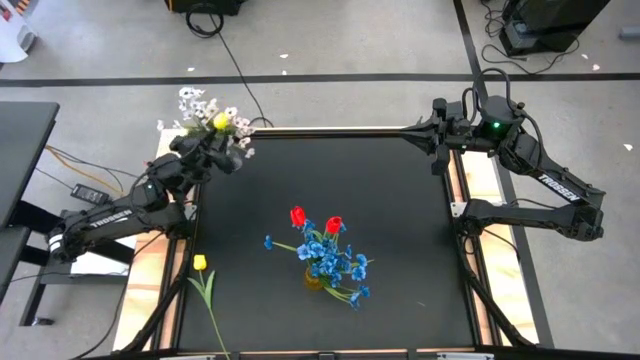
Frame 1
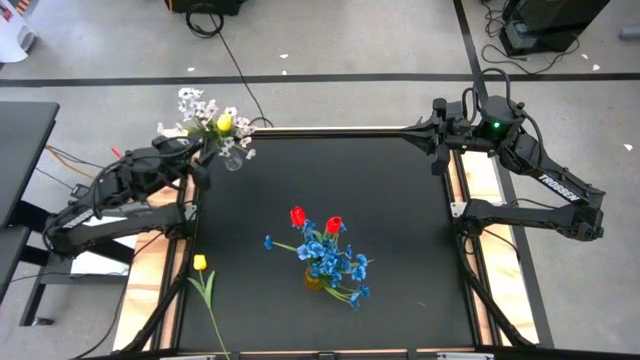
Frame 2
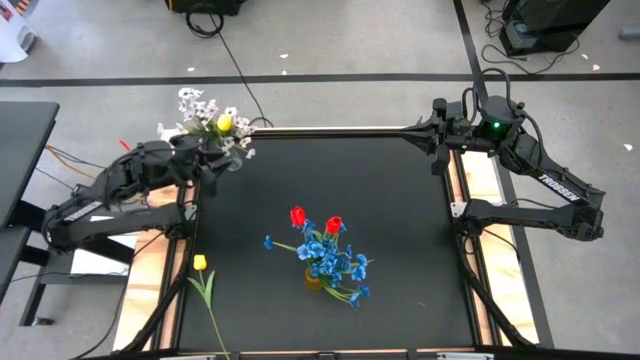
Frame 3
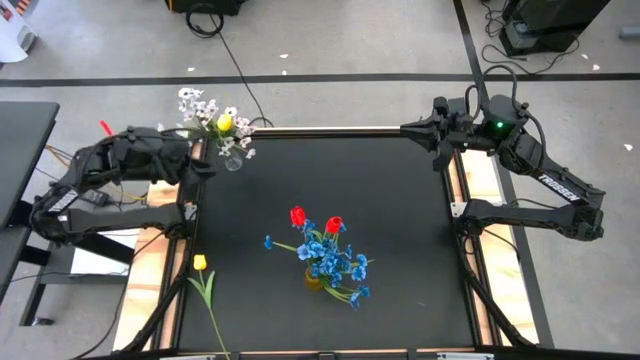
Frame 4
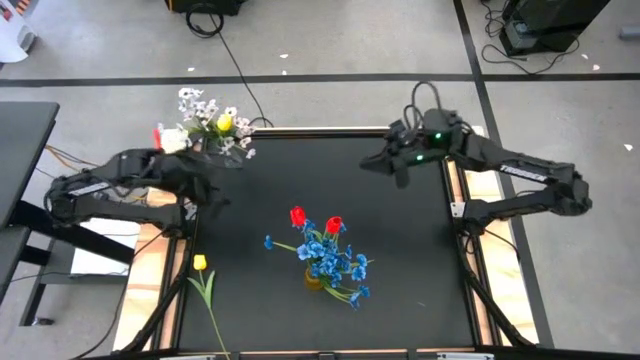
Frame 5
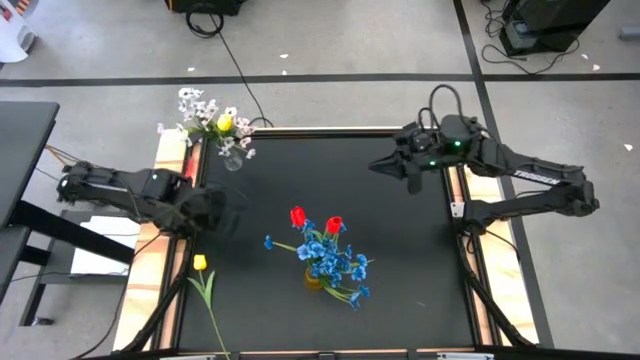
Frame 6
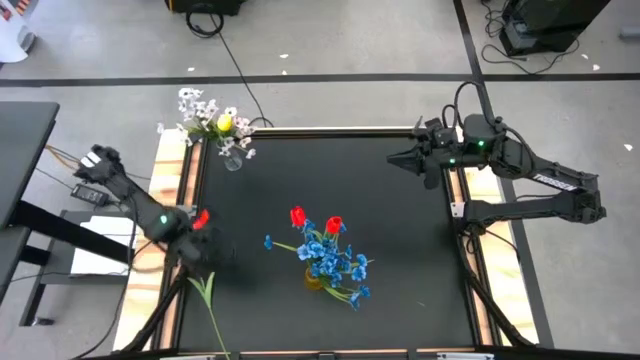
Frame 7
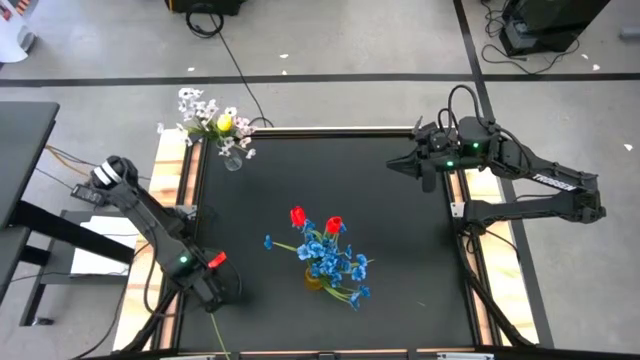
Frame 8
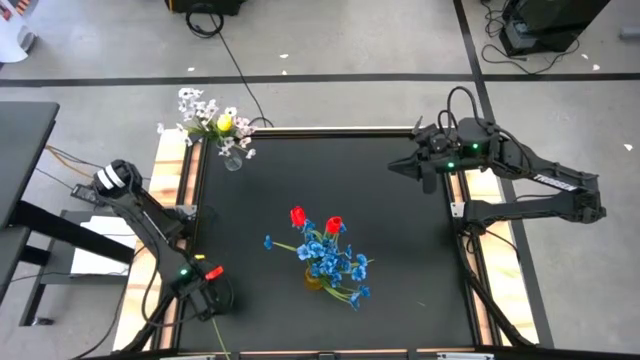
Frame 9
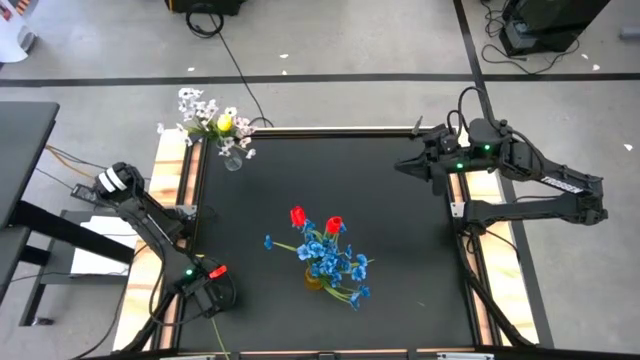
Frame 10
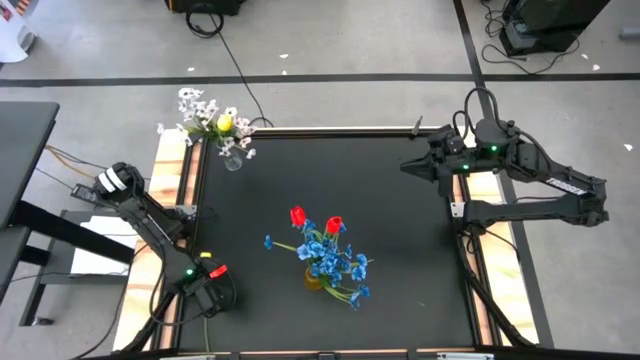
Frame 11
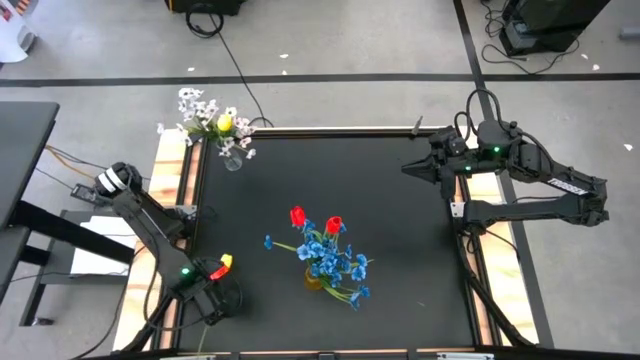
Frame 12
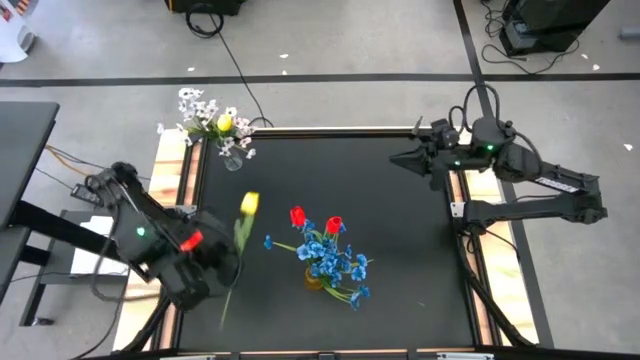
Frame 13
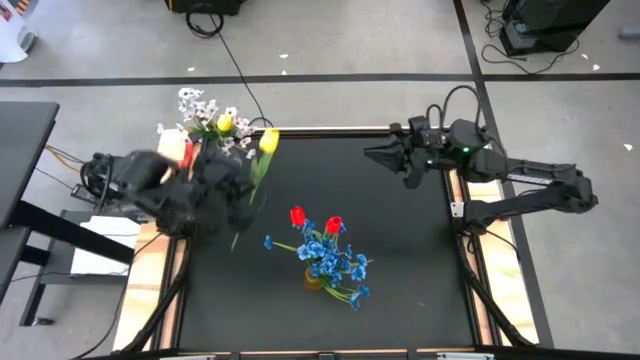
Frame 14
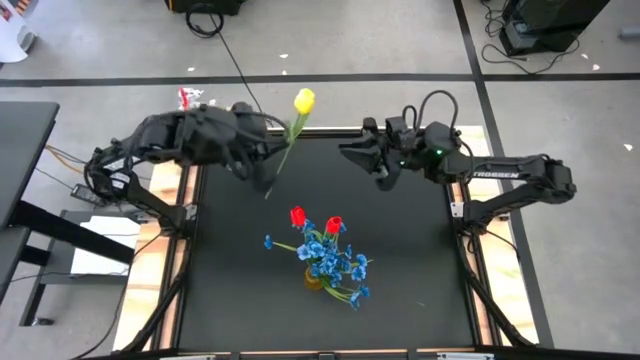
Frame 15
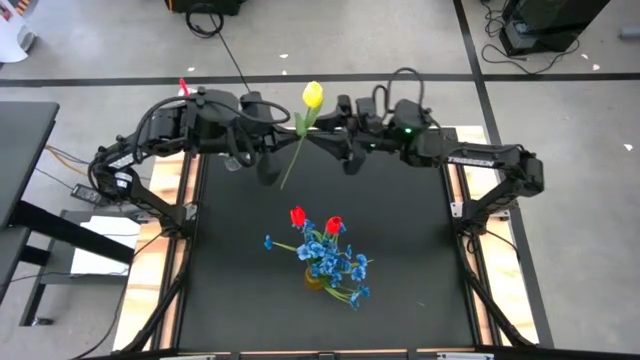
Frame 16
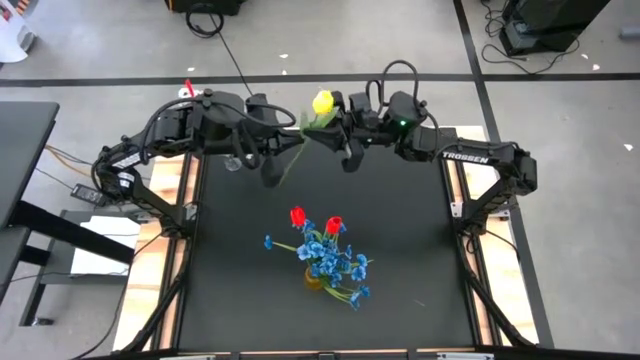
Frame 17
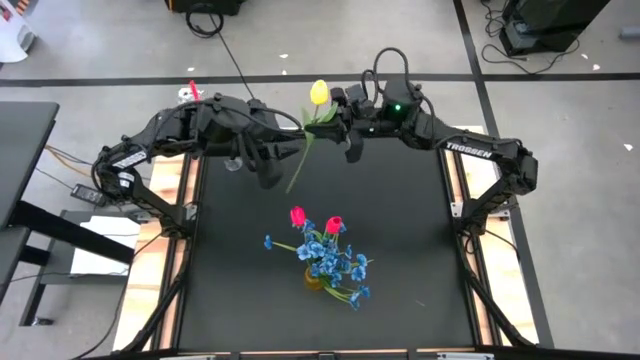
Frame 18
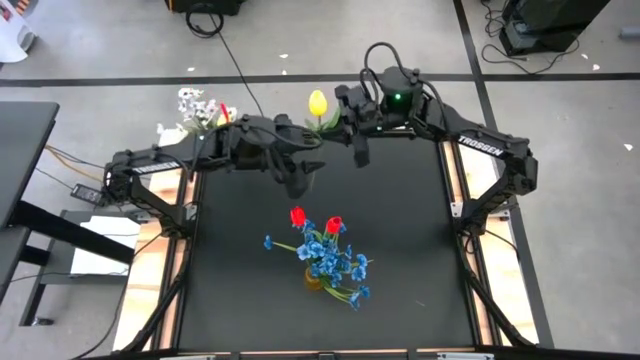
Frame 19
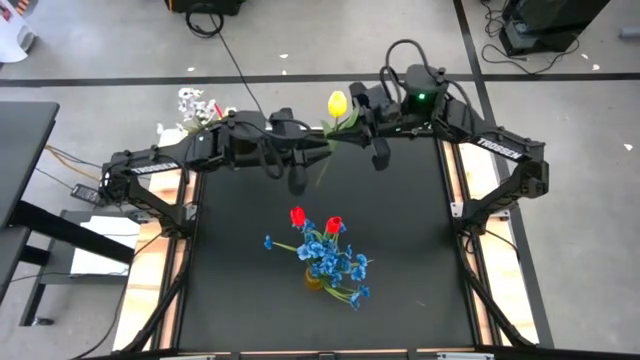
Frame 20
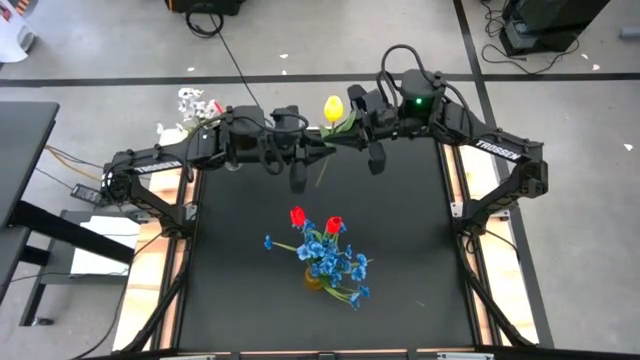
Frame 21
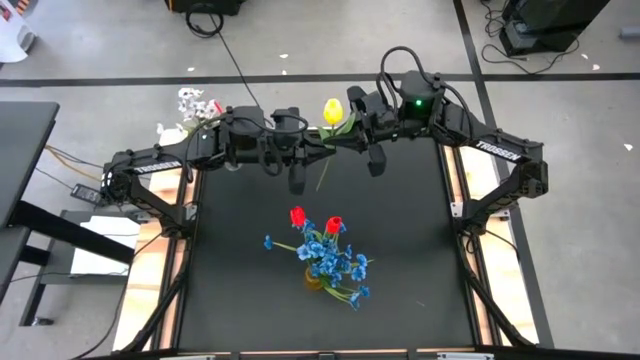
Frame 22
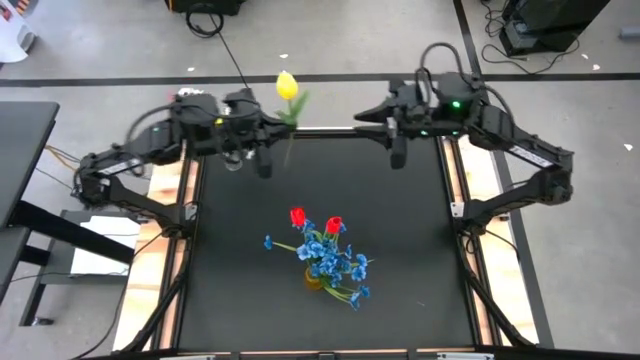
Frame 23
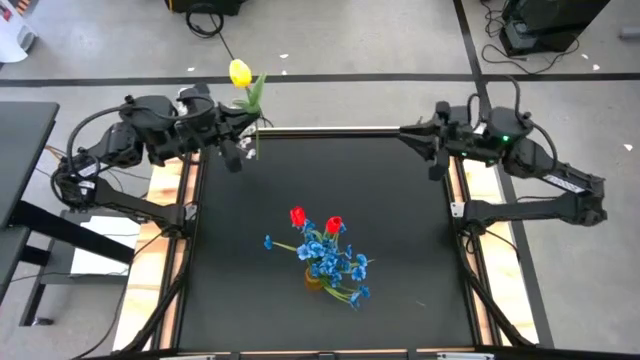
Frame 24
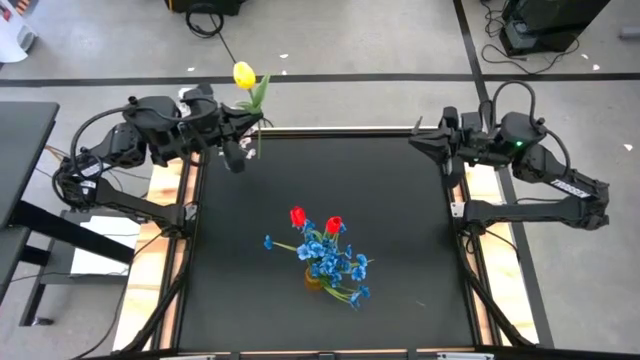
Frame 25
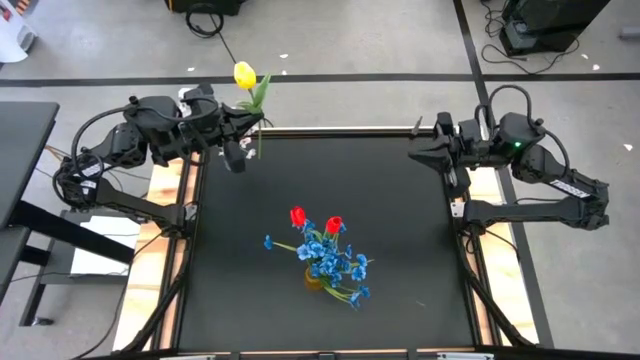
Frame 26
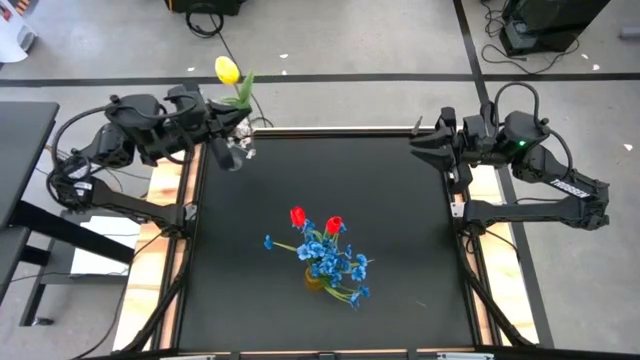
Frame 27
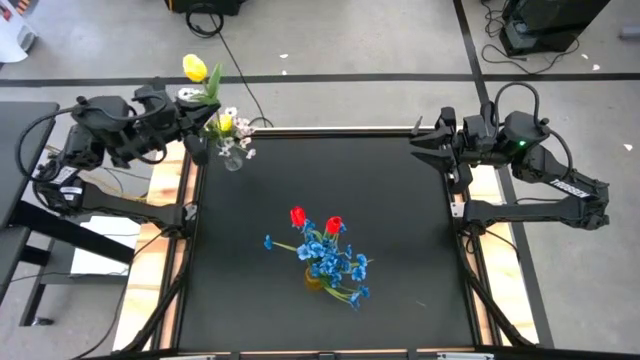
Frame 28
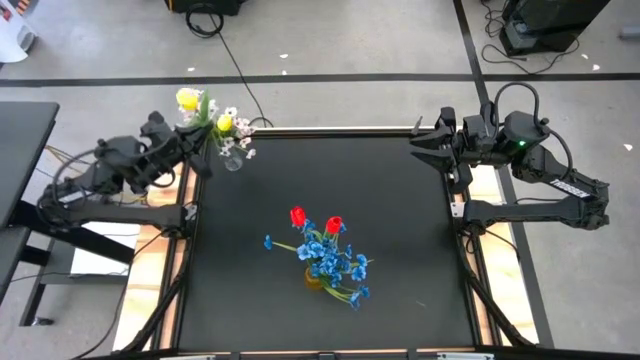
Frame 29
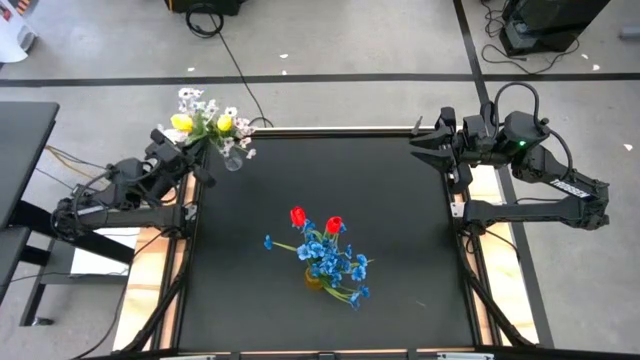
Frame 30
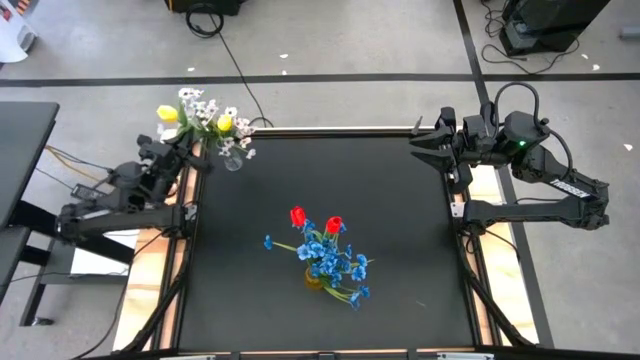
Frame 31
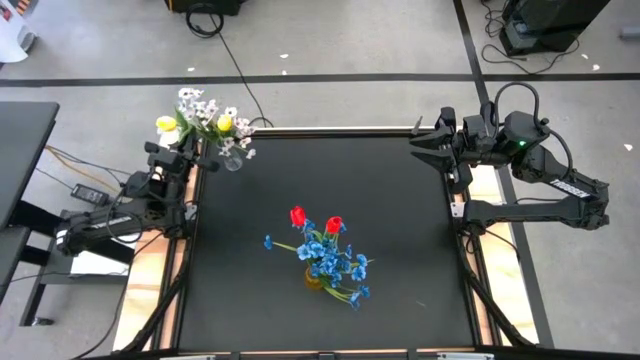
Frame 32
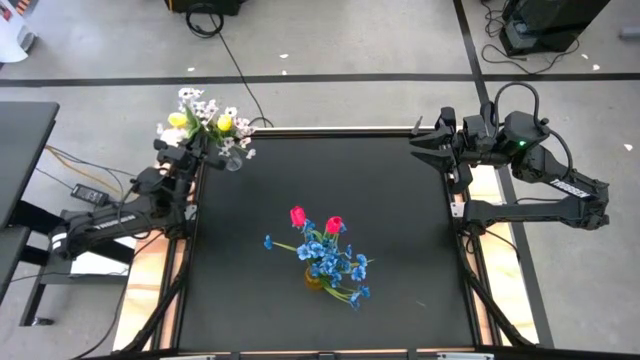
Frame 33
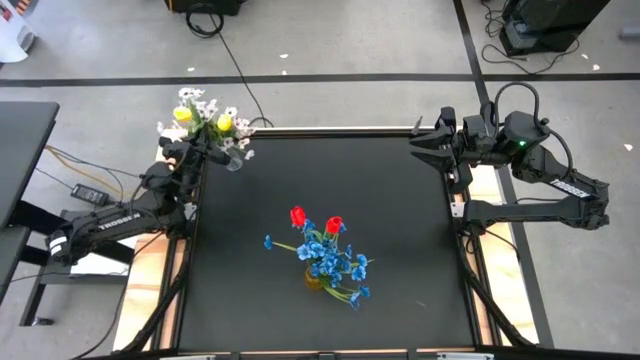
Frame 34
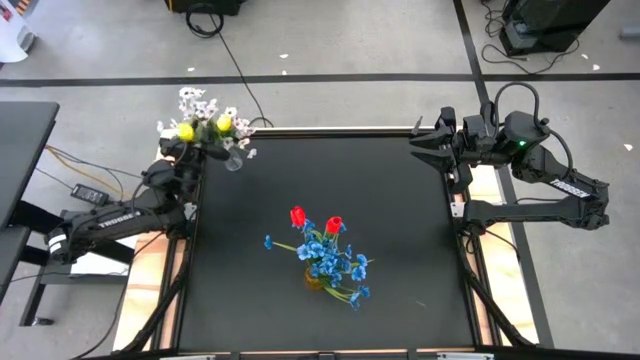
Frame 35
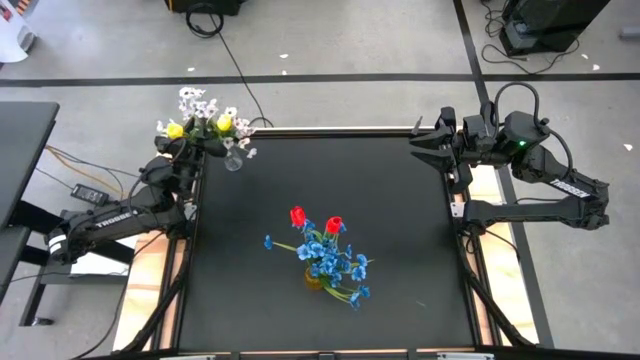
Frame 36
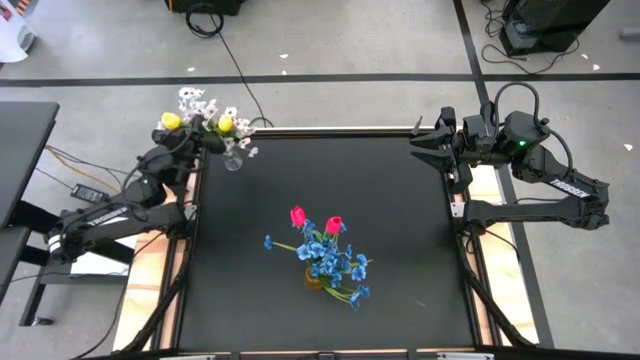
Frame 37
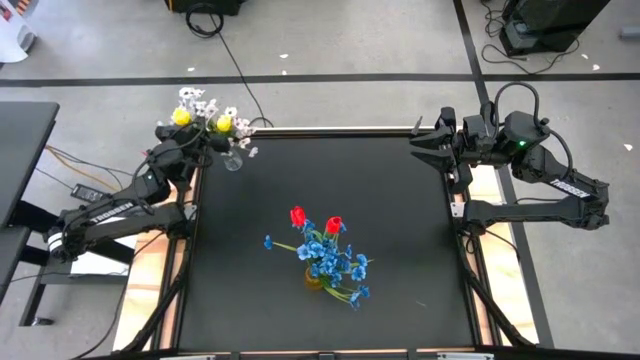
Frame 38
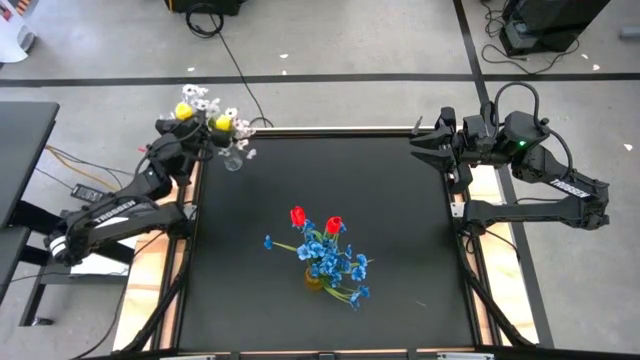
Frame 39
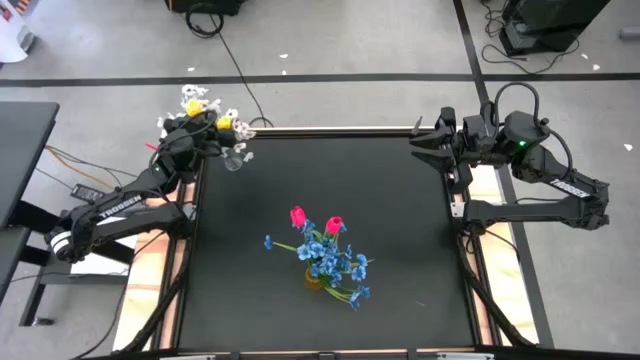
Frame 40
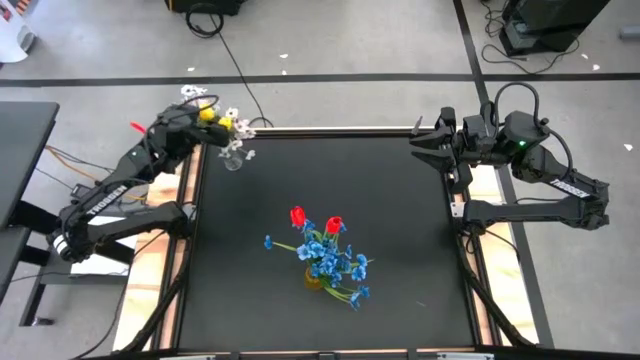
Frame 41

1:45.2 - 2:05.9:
Task: Sort flowers into vase by color
Put the yellow flower into the transparent vase

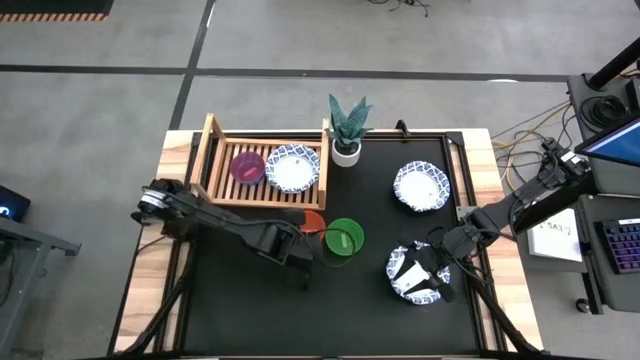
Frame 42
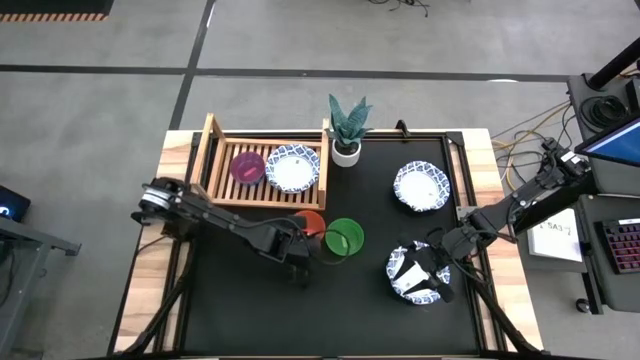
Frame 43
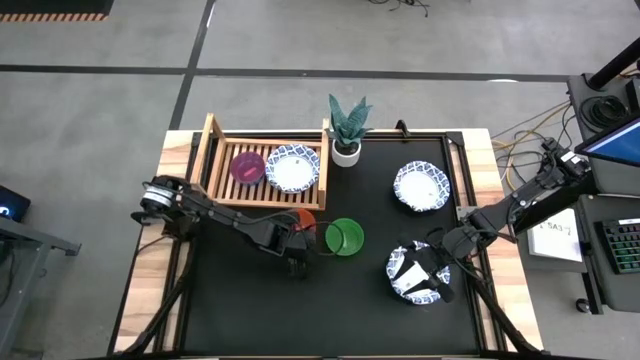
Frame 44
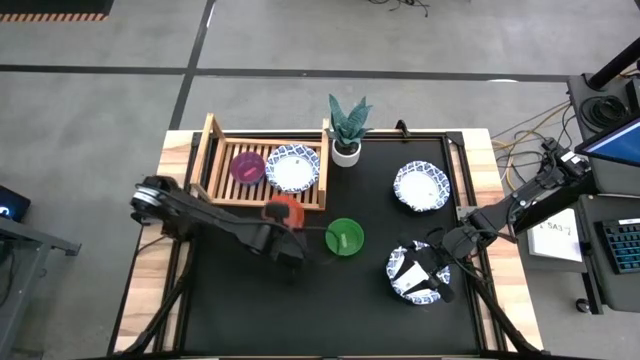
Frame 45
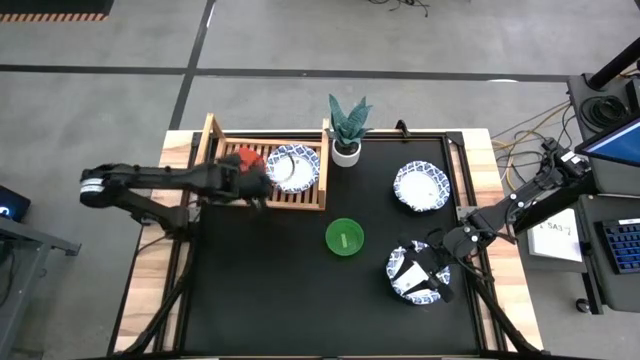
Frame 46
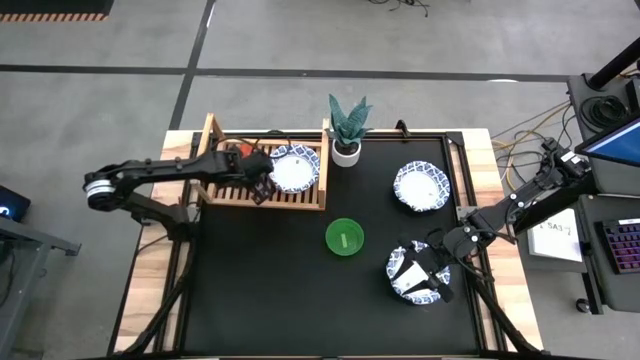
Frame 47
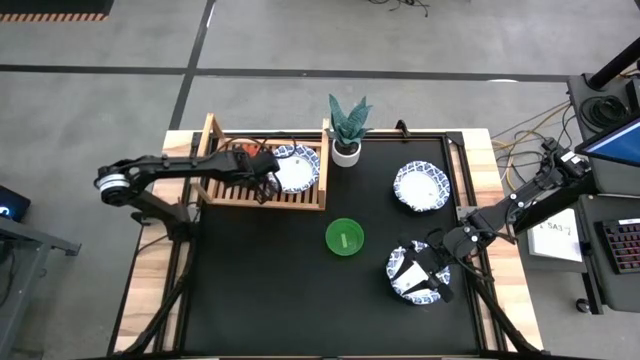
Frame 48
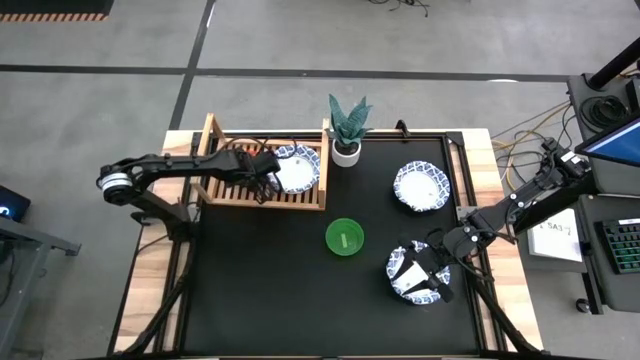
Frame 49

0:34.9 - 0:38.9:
Task: Place and stack bowls onto a shelf
Stack the orange bowl on top of the pink bowl on the shelf
